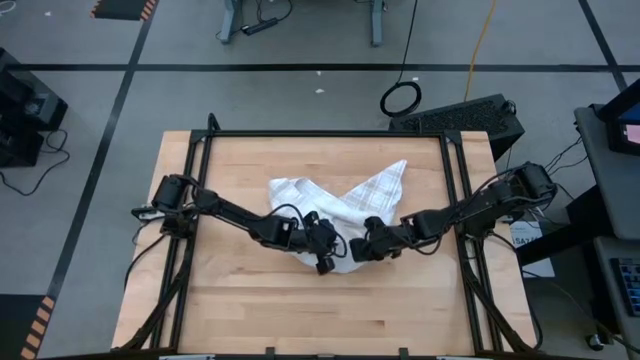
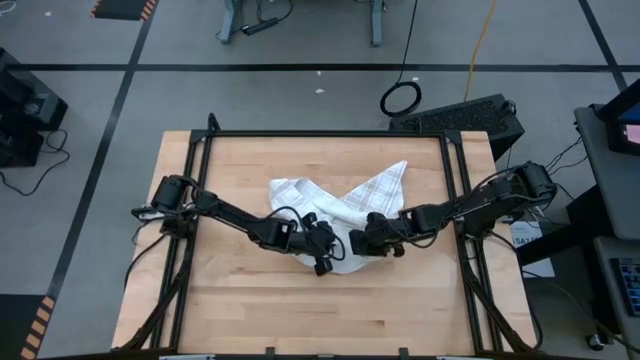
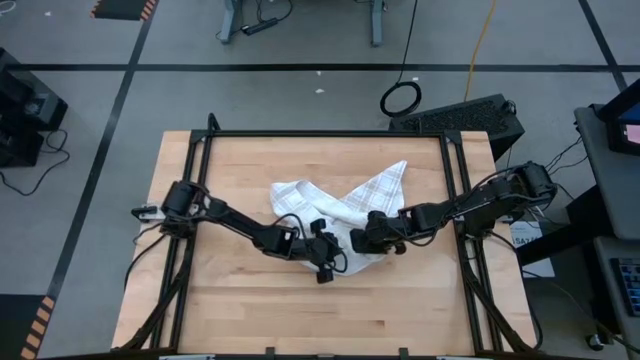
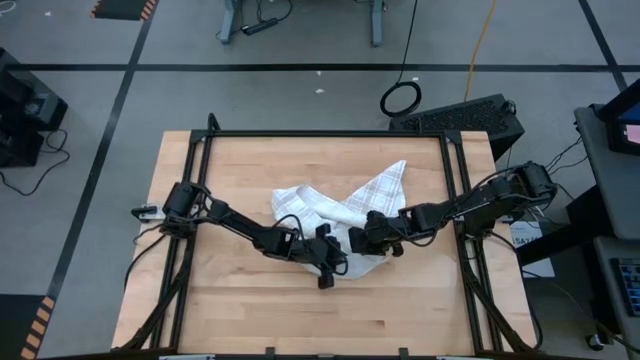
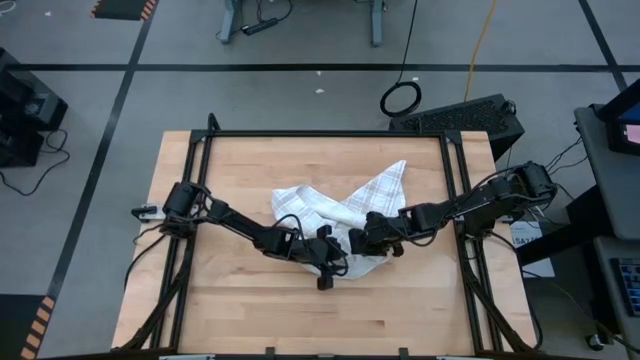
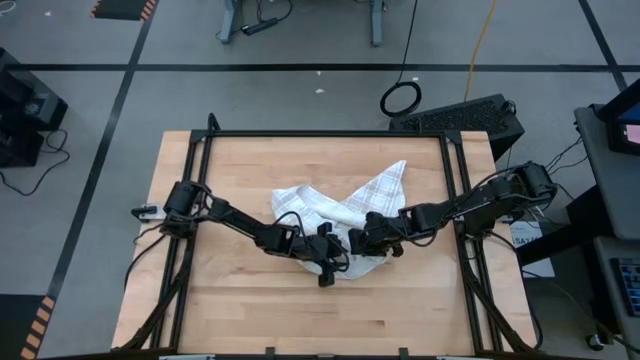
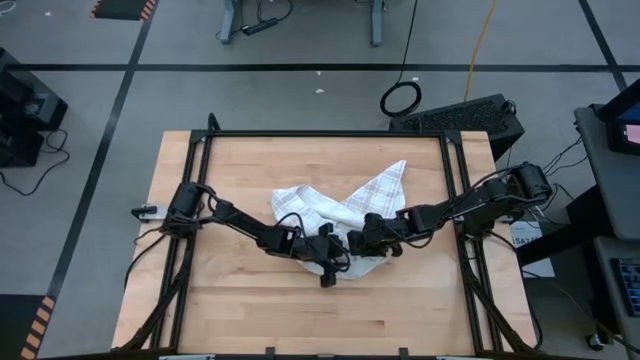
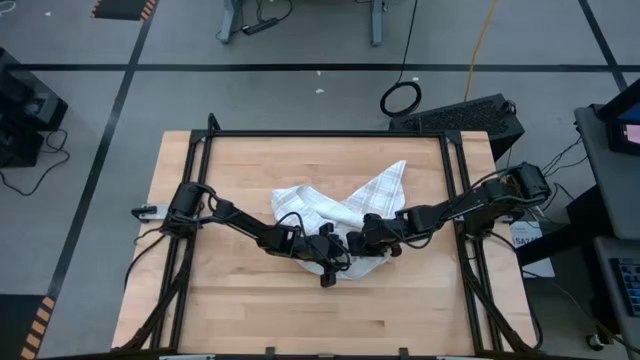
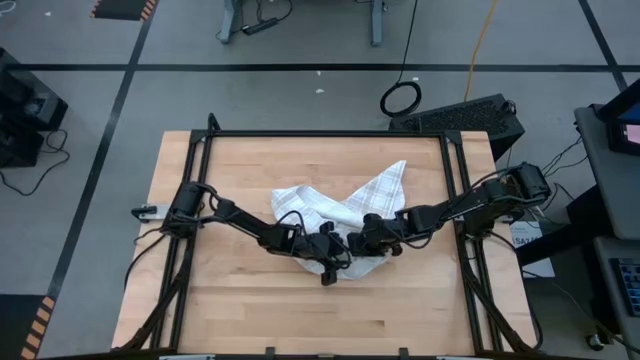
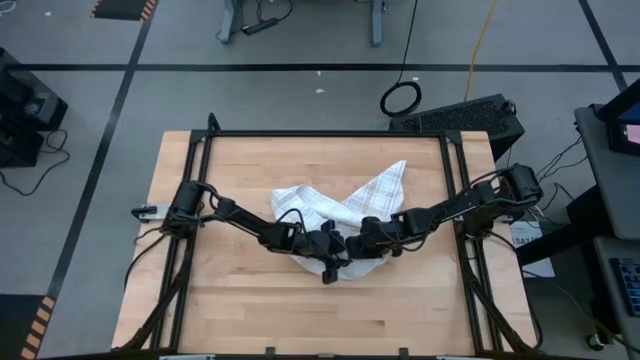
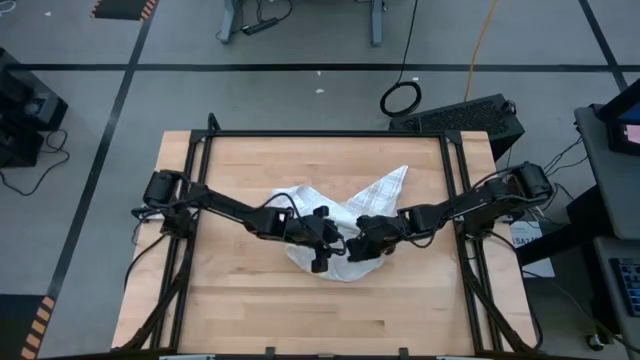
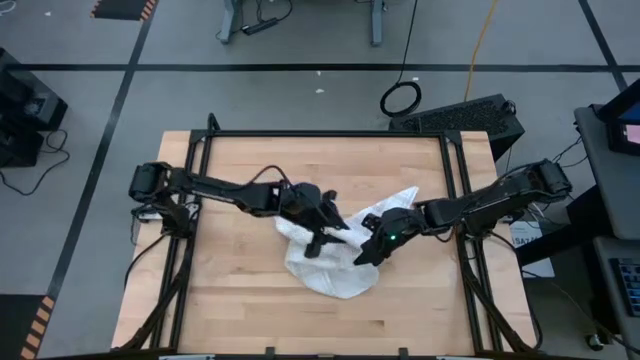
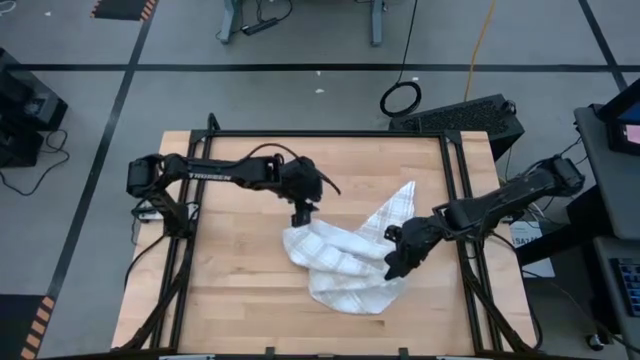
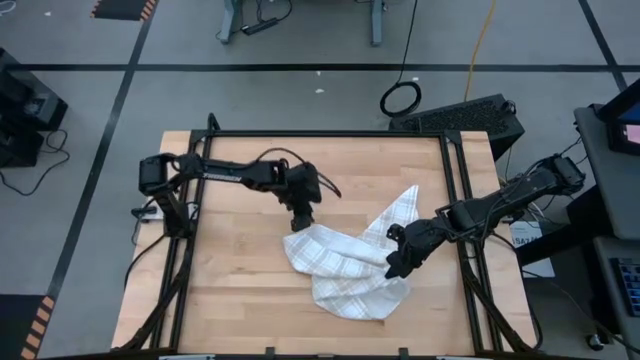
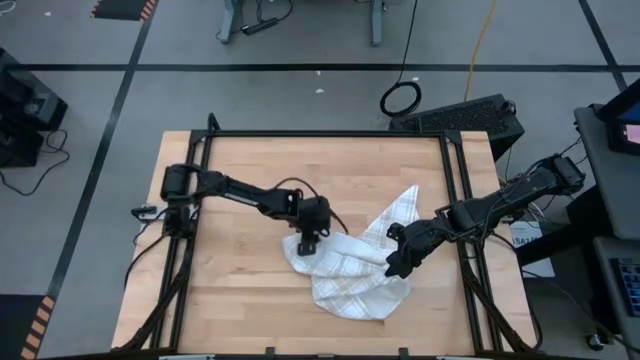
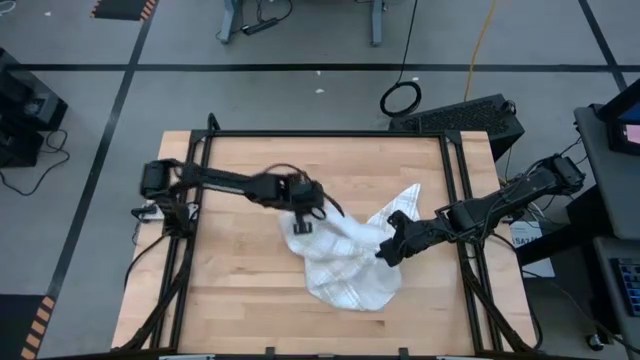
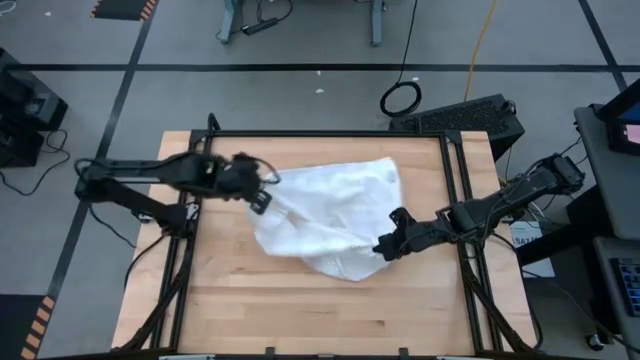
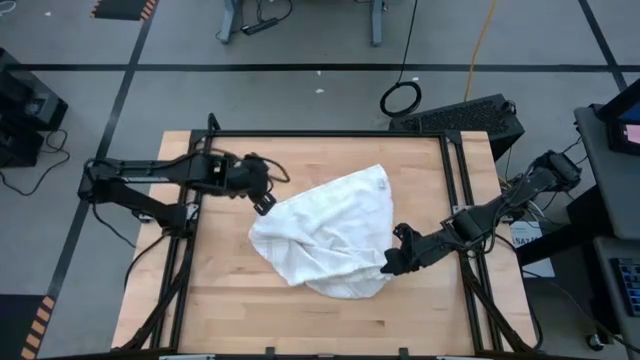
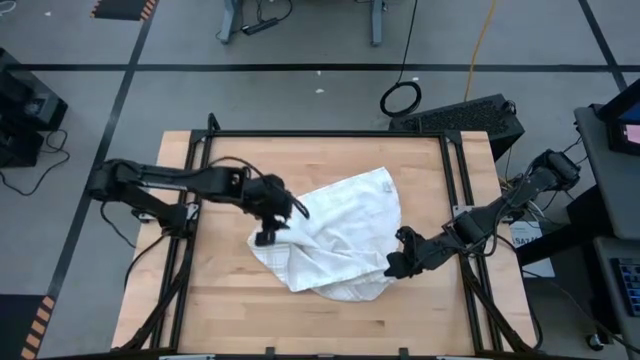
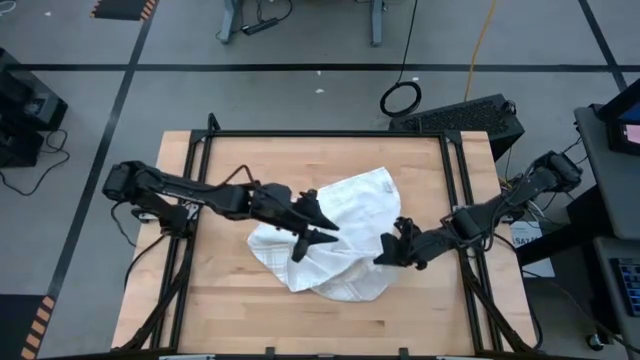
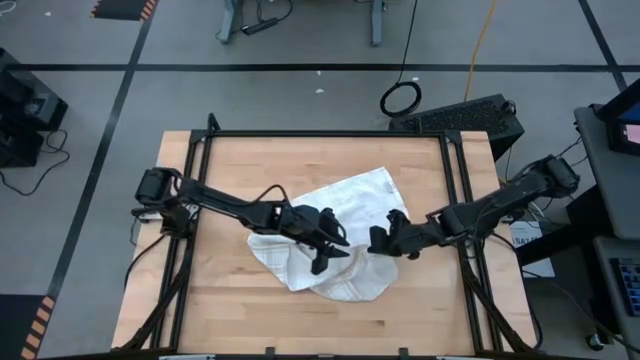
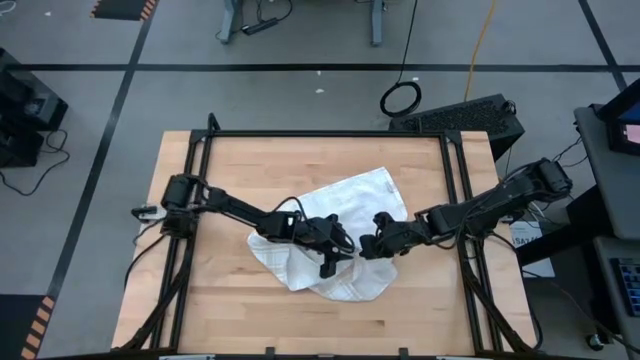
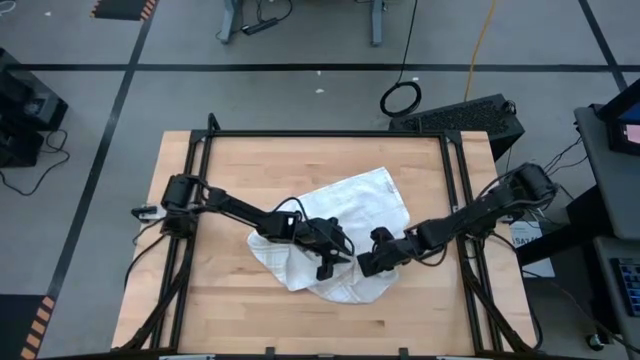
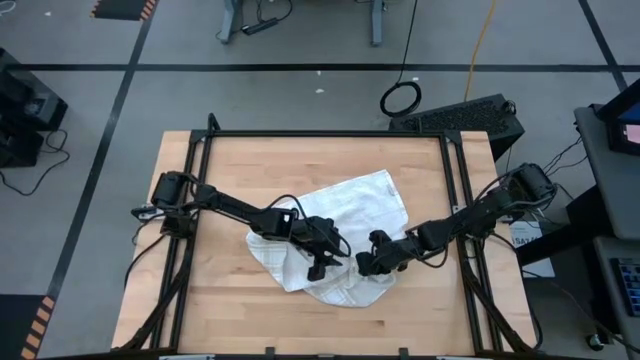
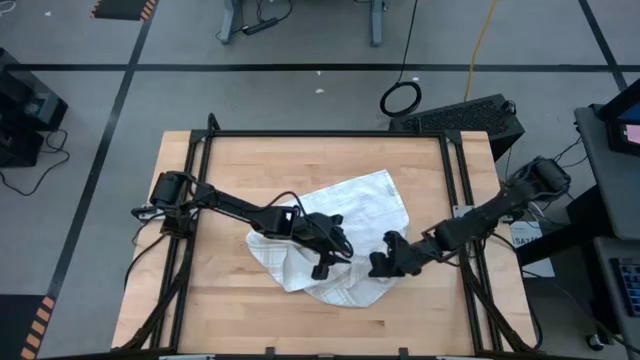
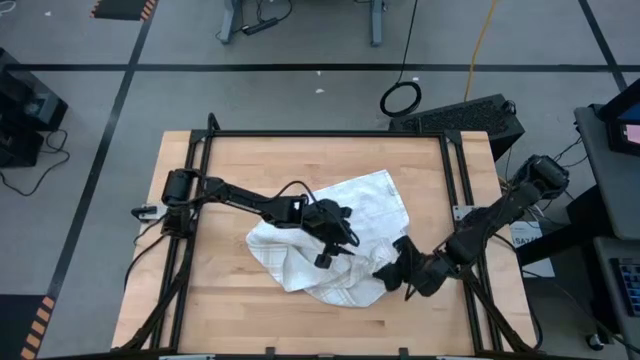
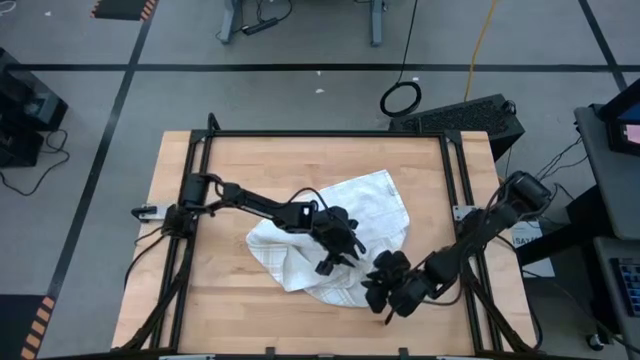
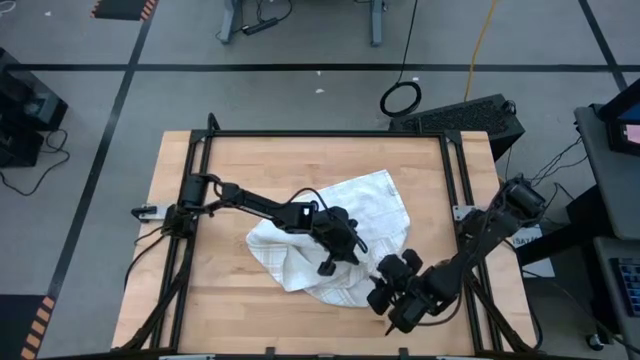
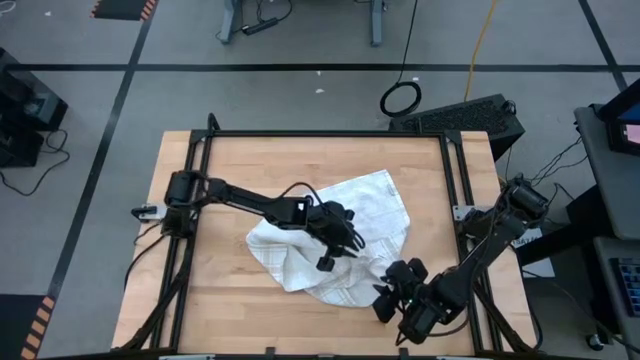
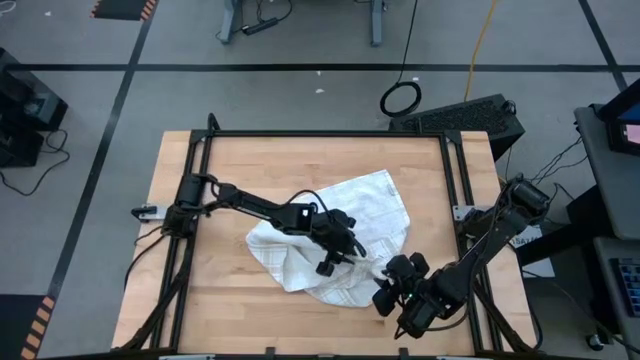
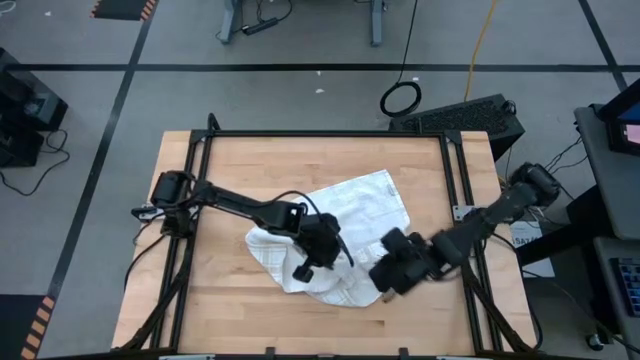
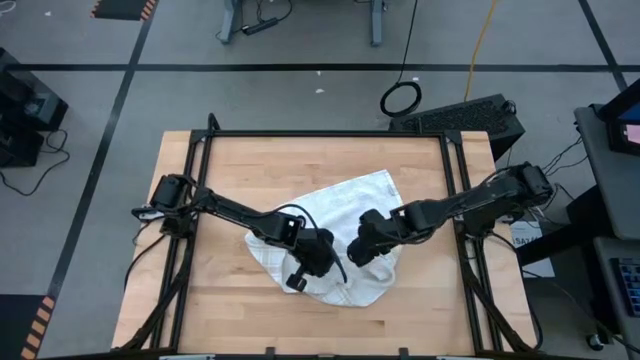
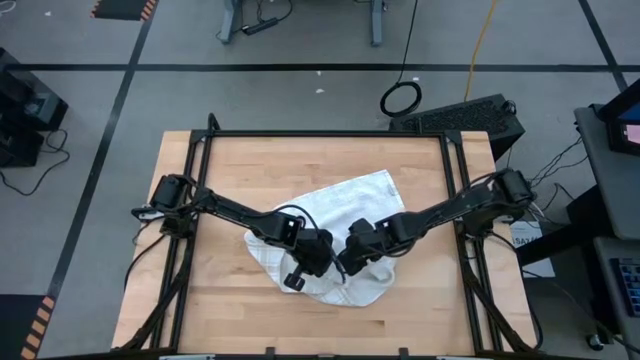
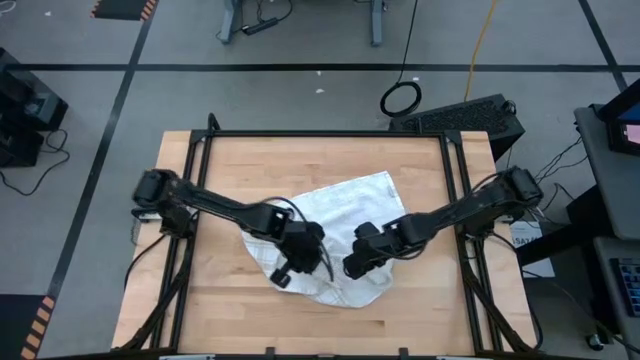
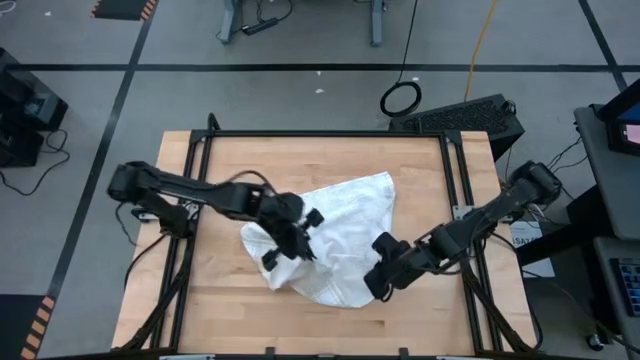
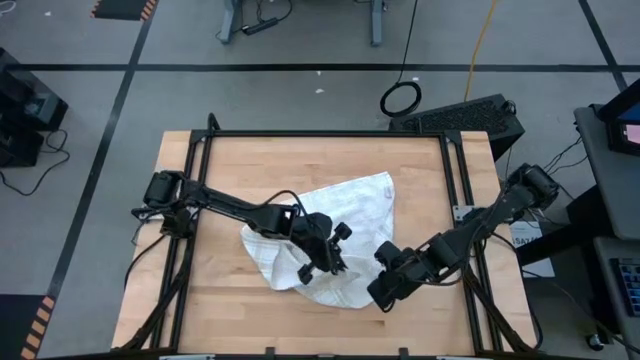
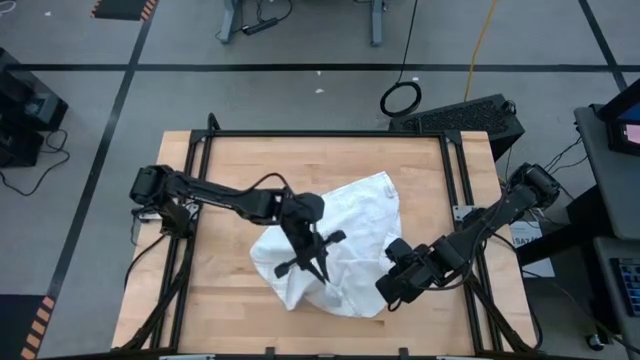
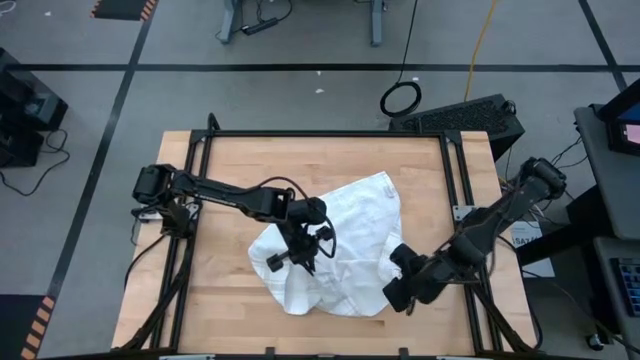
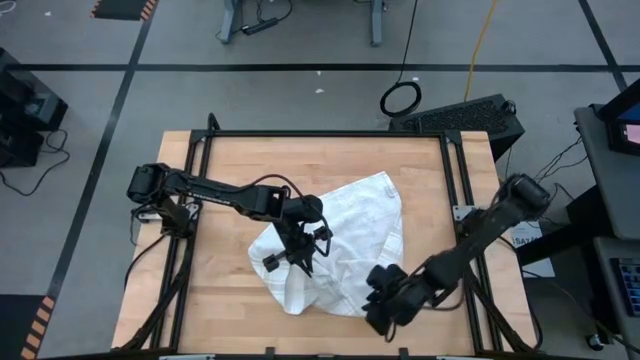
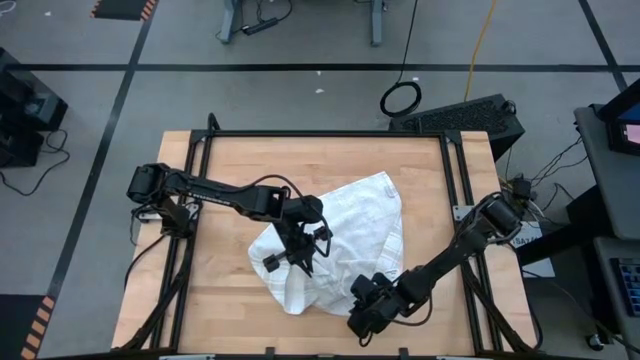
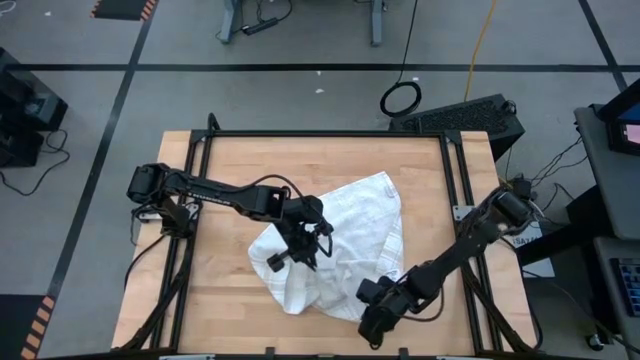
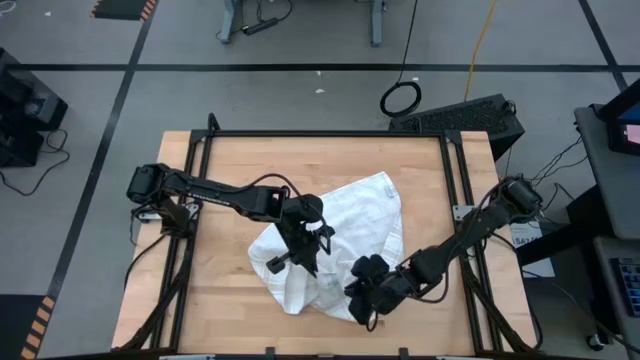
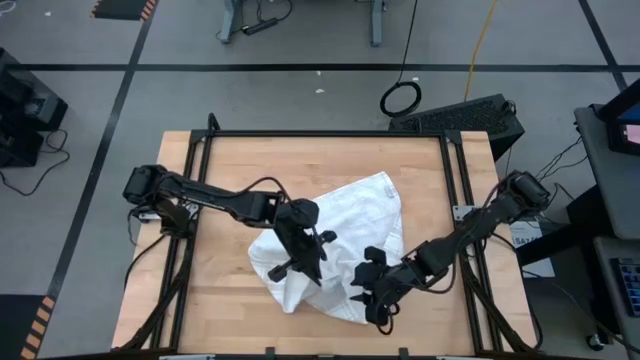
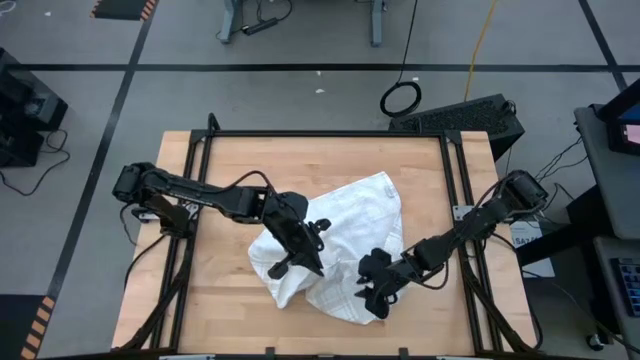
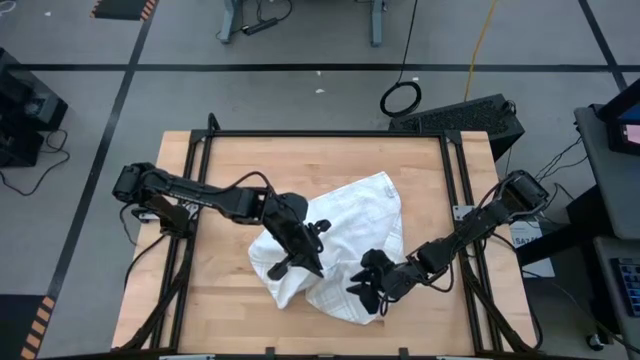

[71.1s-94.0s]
Task: Roll towel
Roll the towel
